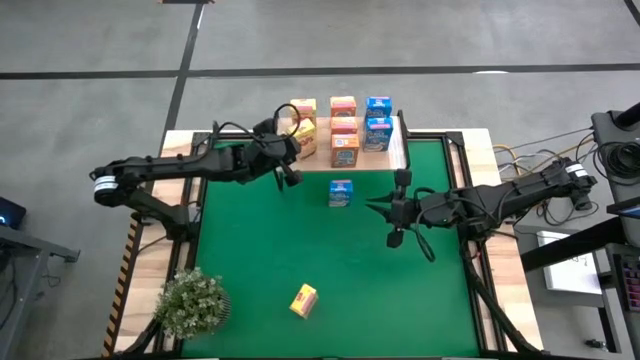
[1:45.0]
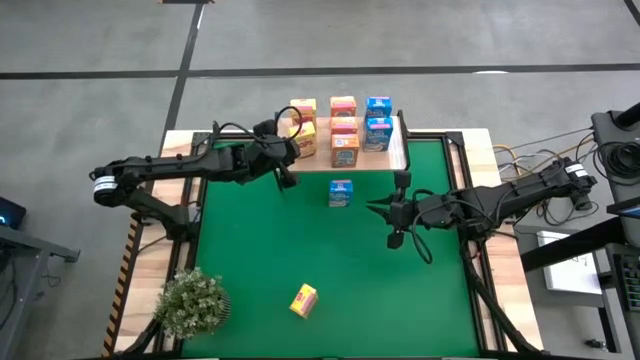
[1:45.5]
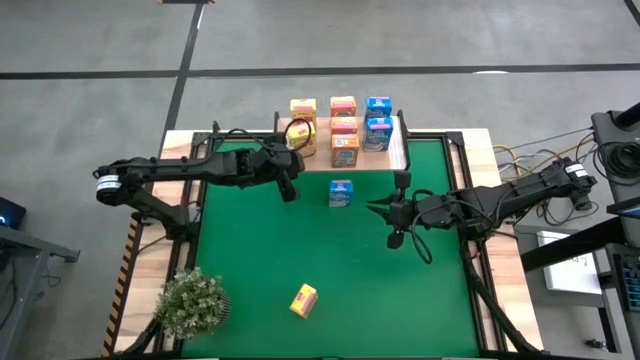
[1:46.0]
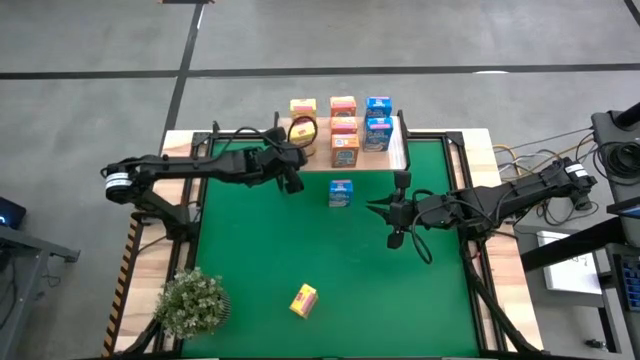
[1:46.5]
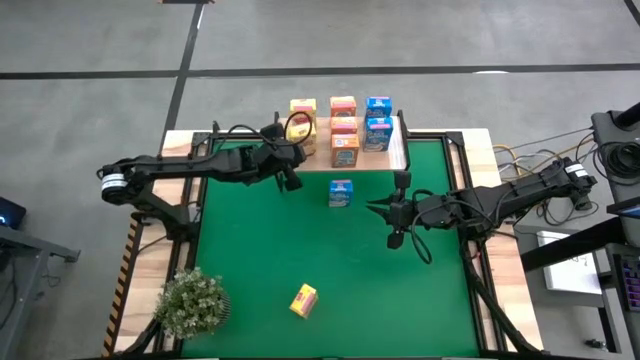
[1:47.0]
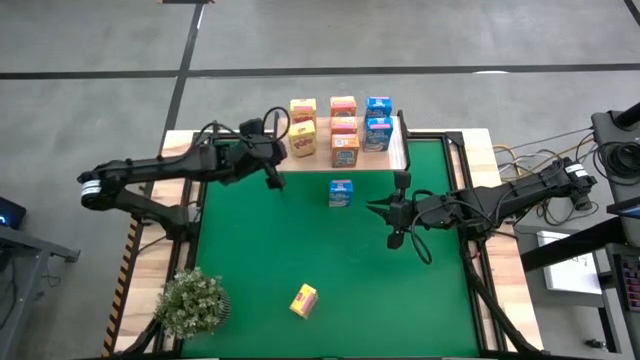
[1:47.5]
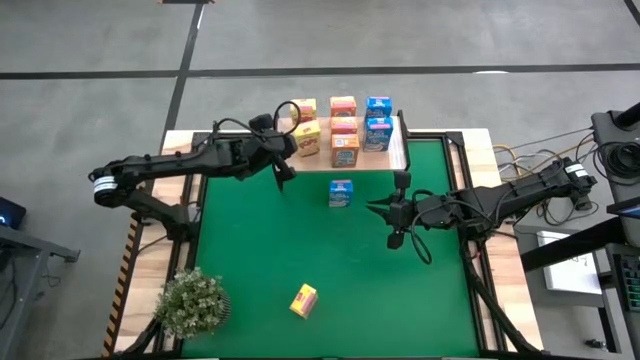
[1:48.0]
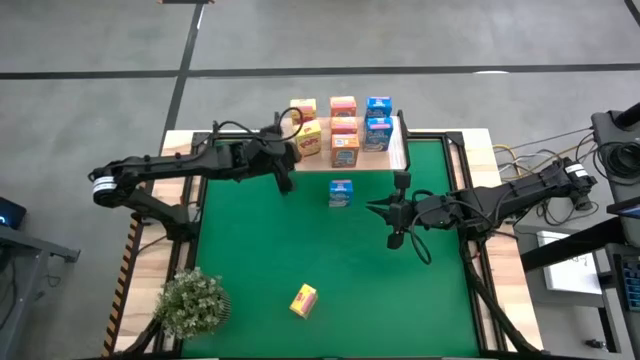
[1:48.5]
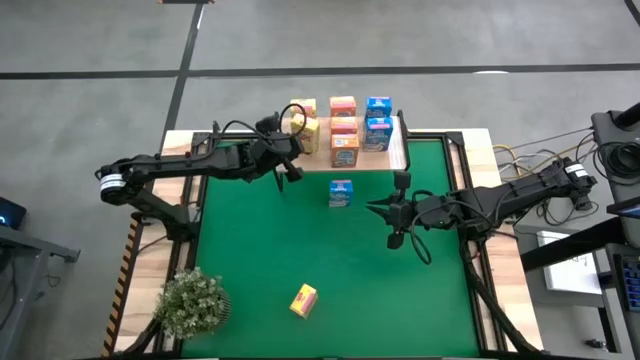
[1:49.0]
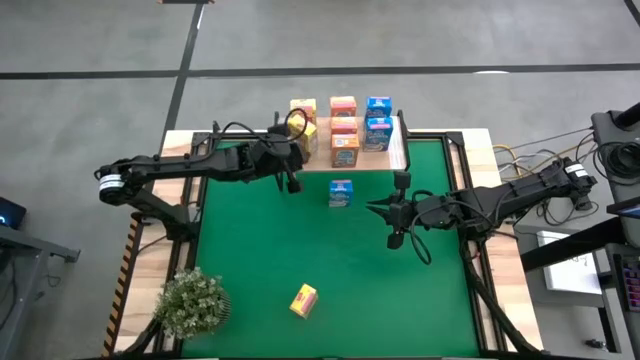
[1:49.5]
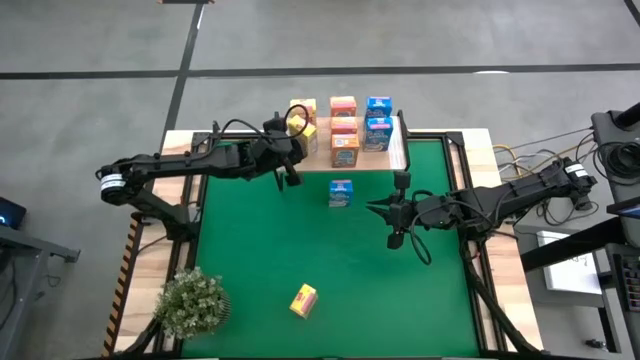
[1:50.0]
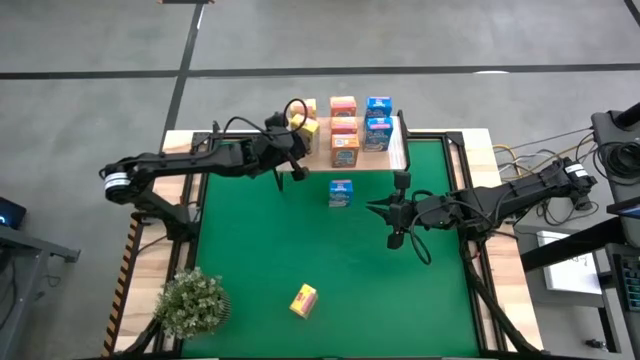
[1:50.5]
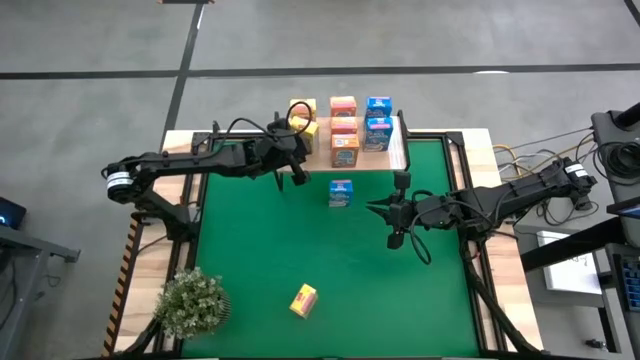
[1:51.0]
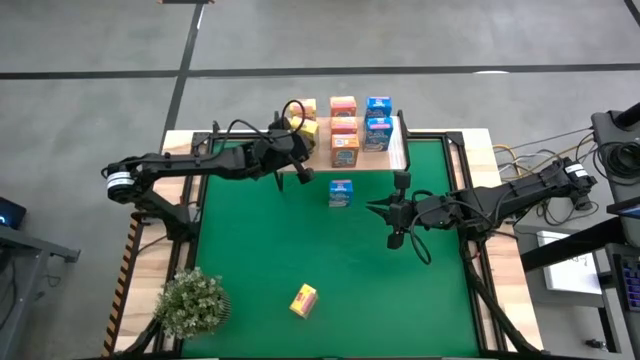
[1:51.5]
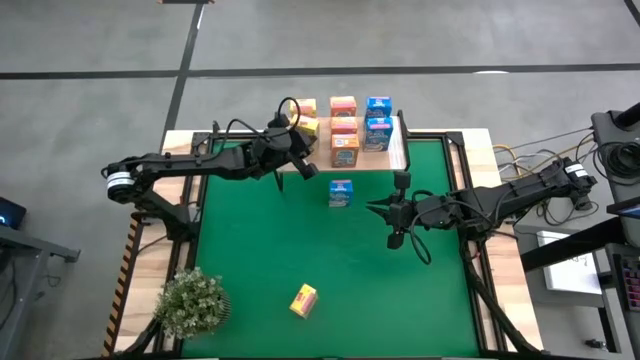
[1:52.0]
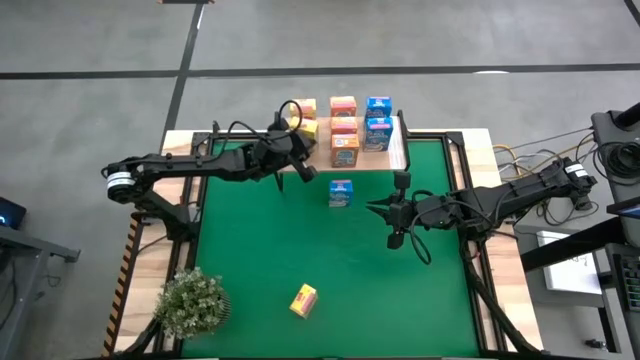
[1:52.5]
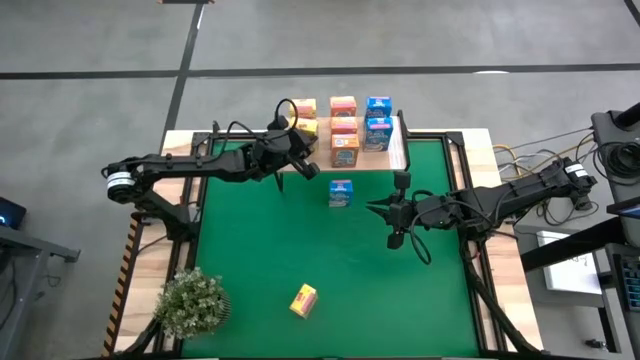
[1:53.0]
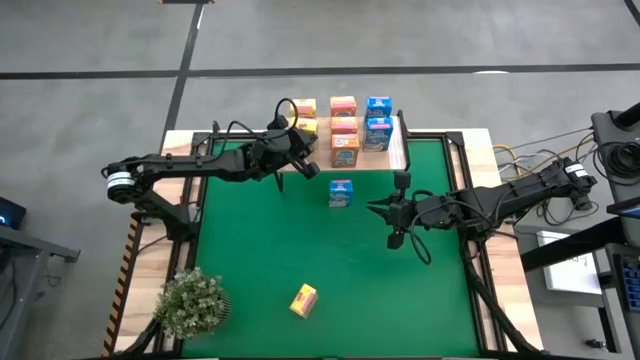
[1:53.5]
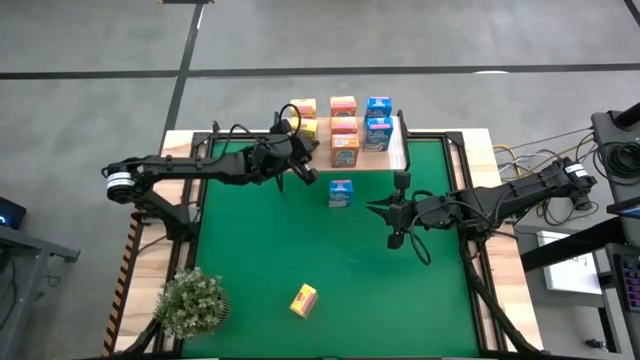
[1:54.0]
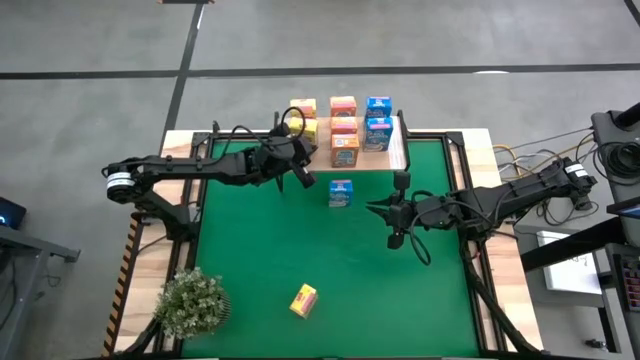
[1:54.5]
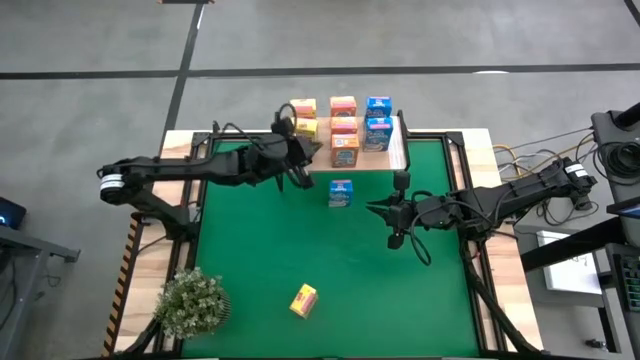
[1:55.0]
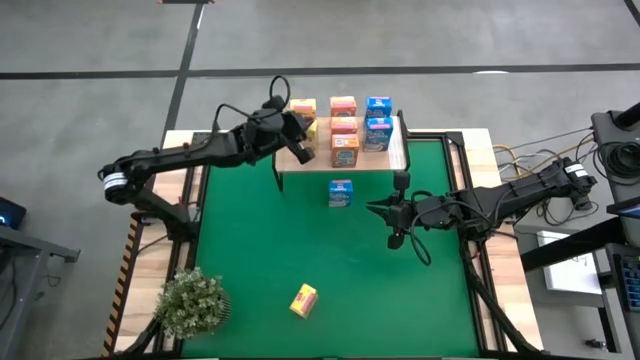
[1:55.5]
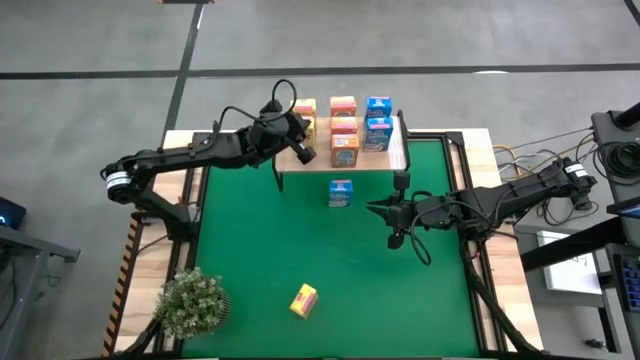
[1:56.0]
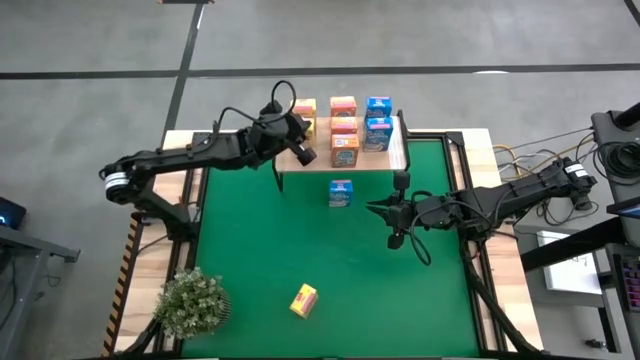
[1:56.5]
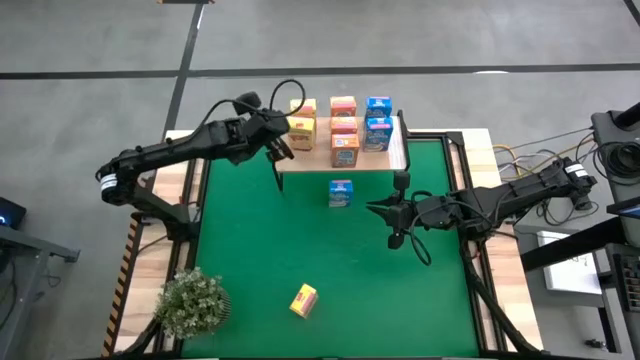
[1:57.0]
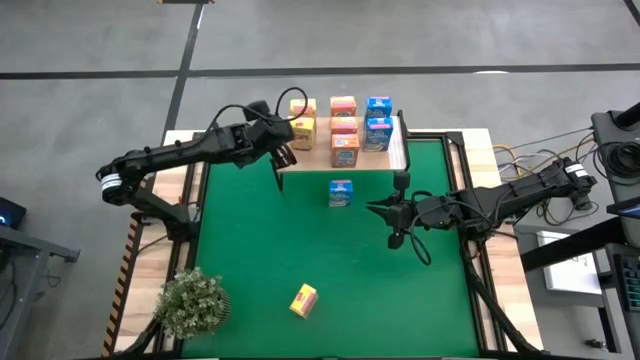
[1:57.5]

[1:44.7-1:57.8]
Task: Stack cereal on shelf
Put the right yellow cereal box on the shelf aligned with the other yellow cereal box

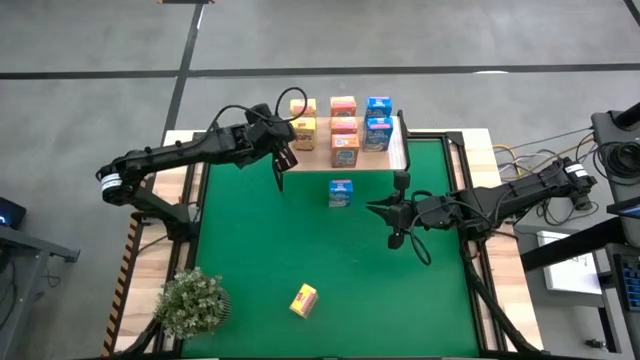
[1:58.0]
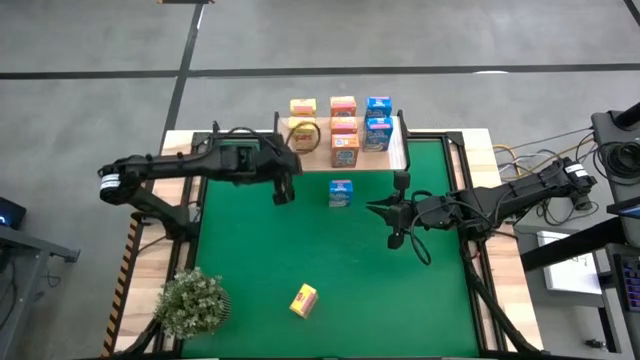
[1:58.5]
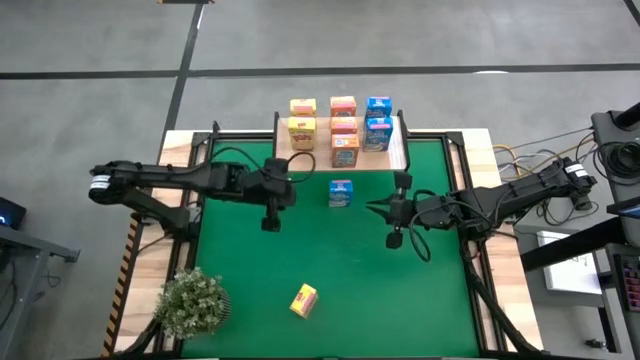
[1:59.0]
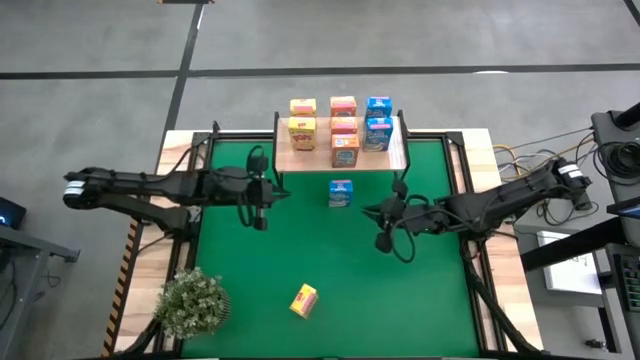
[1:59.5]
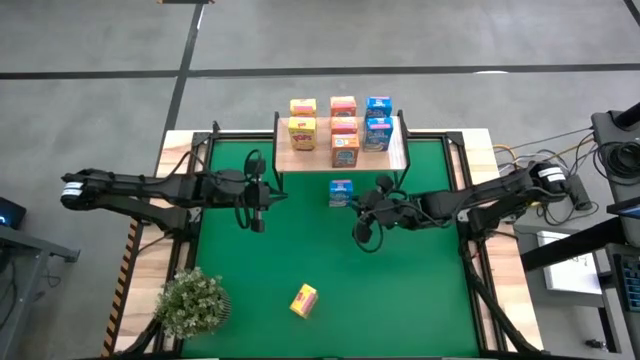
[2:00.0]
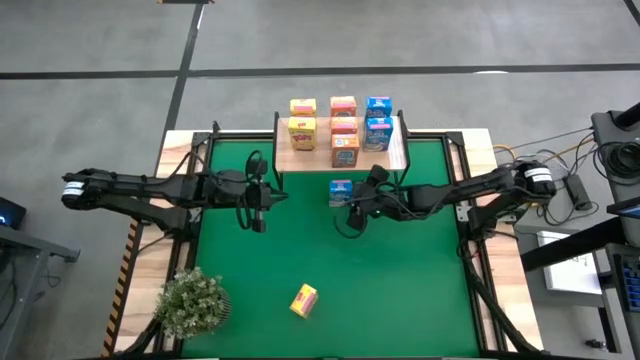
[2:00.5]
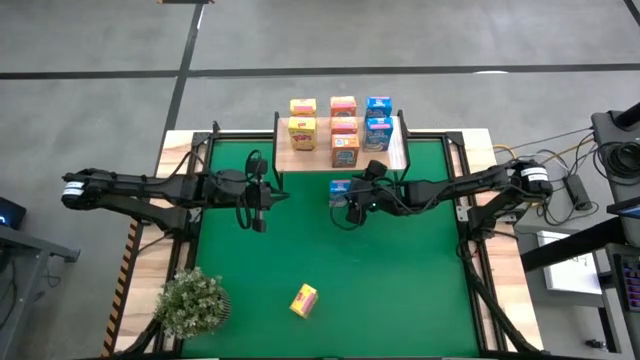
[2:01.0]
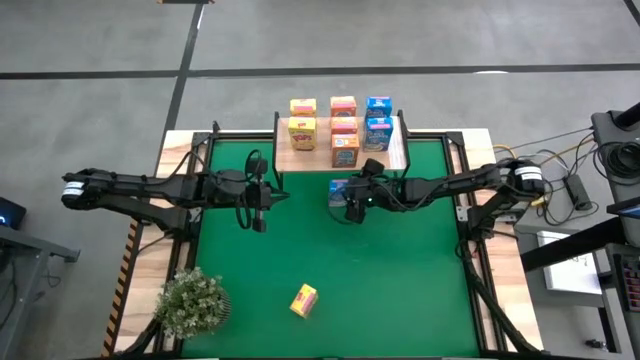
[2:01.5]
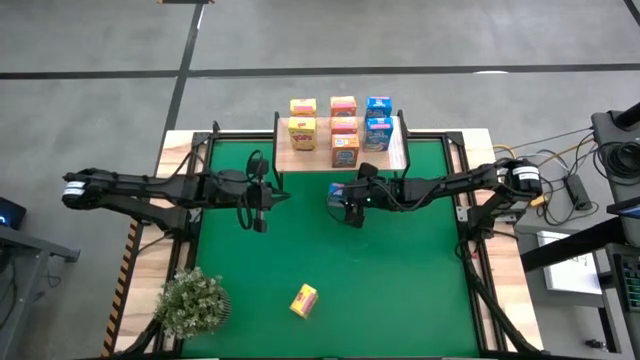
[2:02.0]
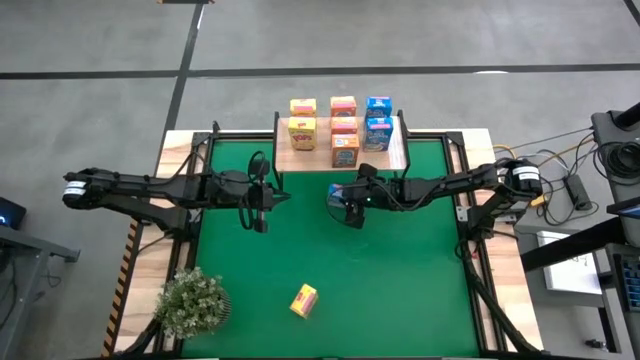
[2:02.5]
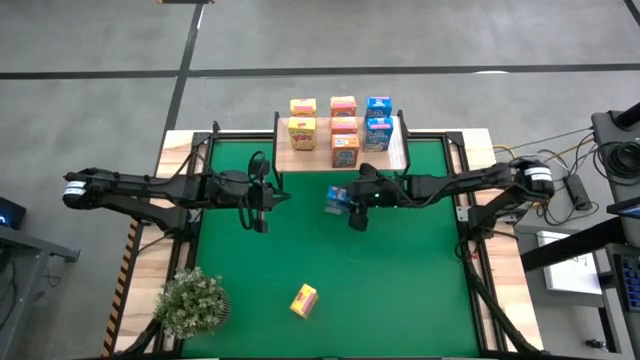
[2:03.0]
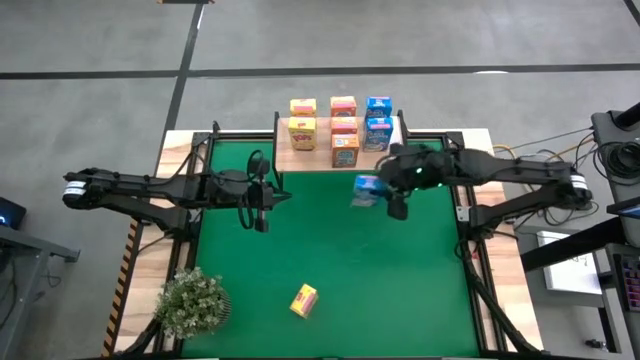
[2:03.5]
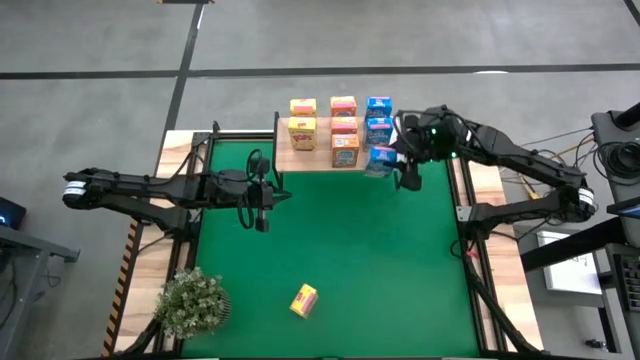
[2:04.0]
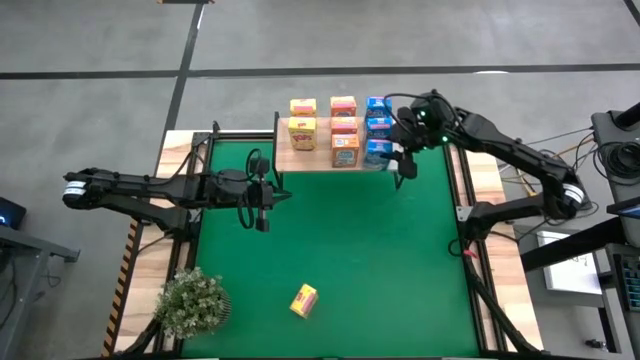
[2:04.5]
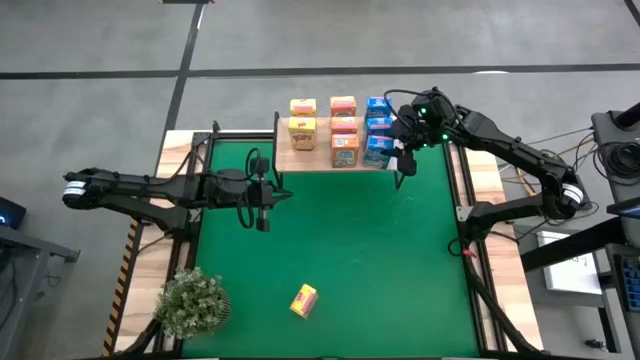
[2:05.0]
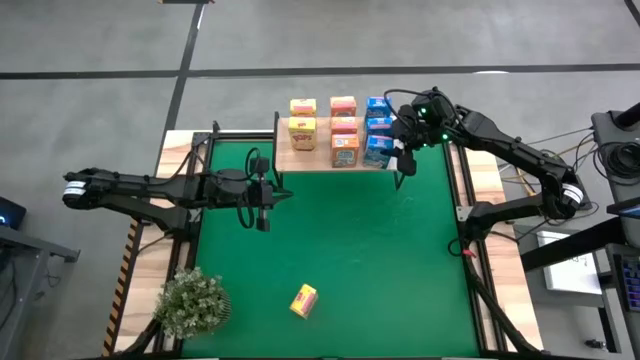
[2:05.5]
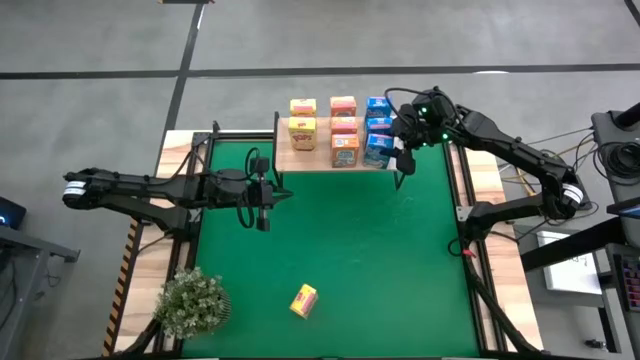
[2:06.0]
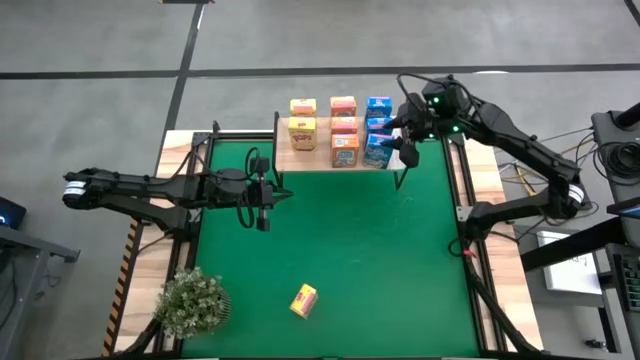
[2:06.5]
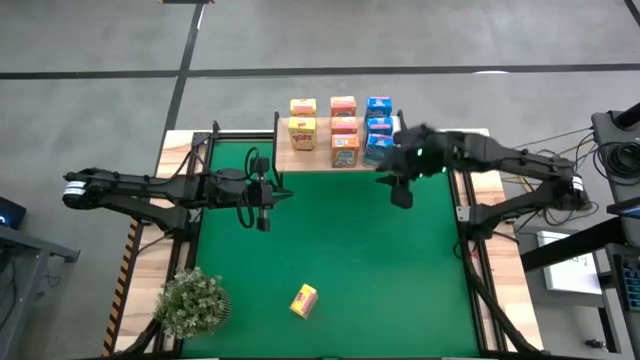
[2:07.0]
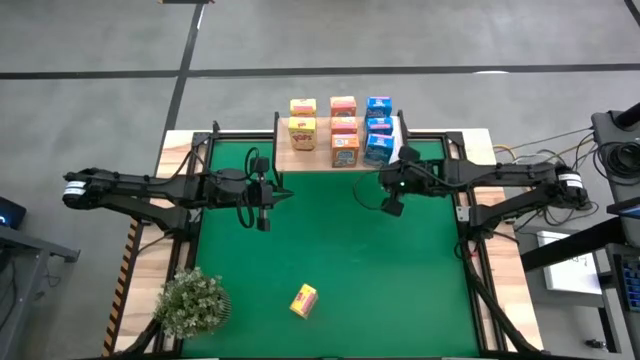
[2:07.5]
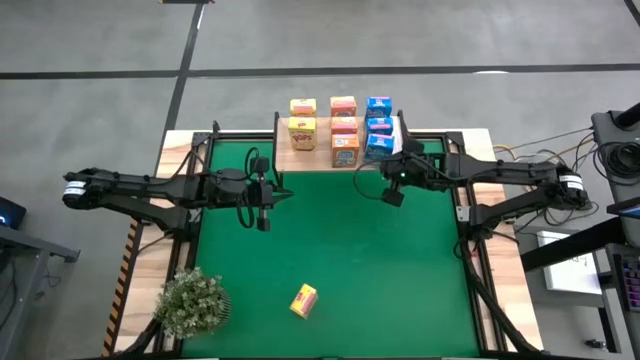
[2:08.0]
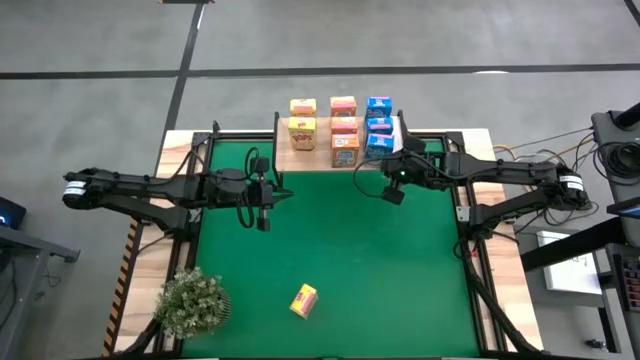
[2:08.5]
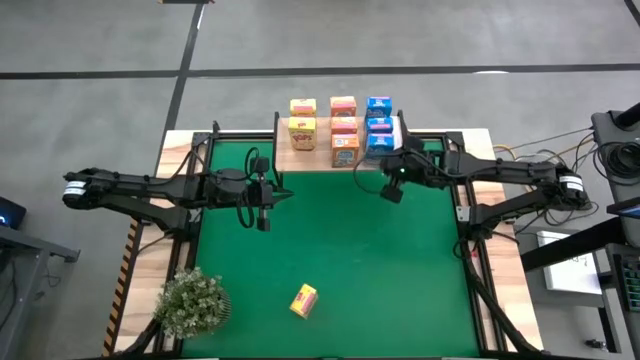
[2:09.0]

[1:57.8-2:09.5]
Put the blue cereal box on the shelf aligned with the other blue cereal boxes
